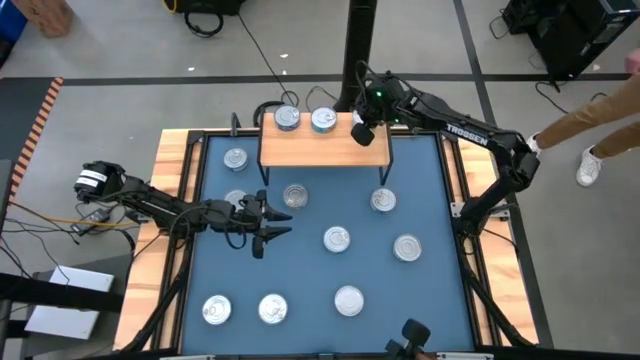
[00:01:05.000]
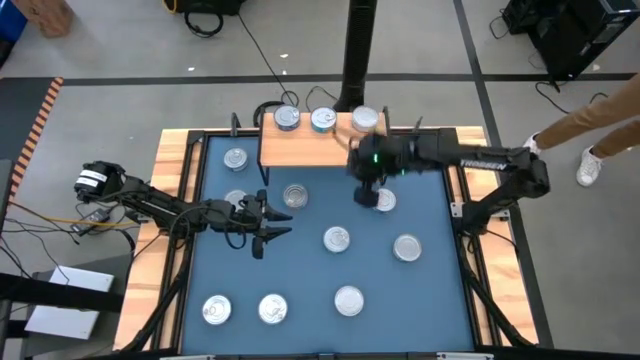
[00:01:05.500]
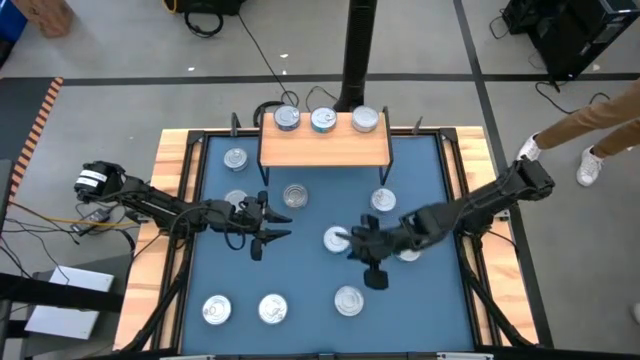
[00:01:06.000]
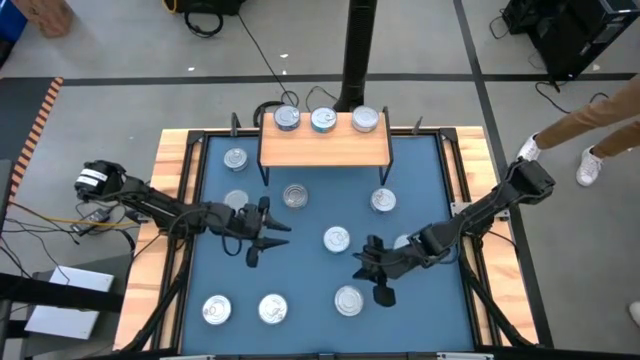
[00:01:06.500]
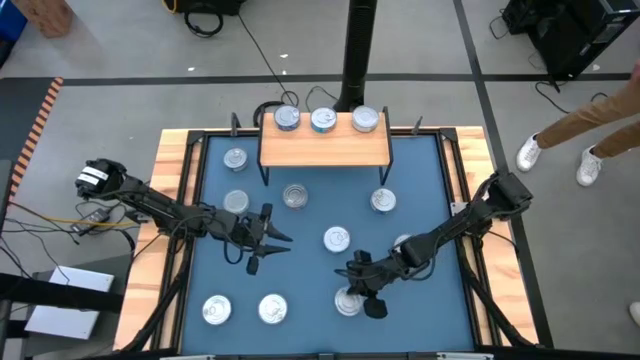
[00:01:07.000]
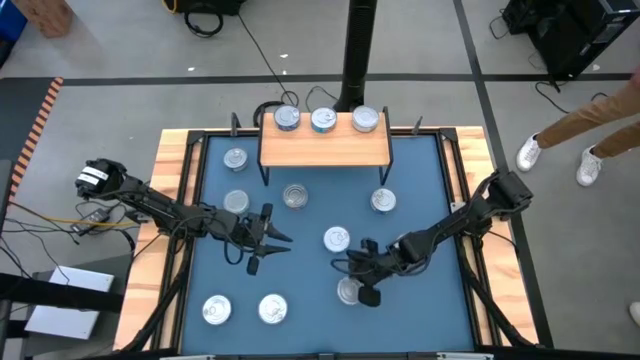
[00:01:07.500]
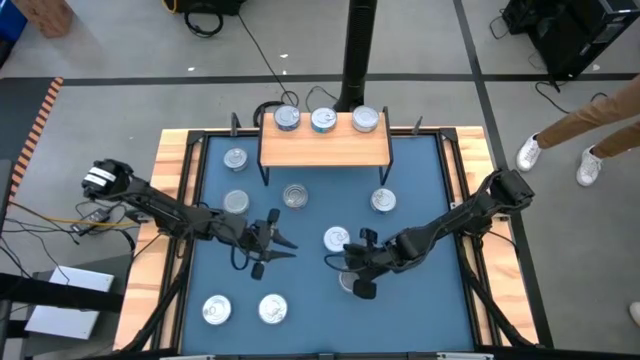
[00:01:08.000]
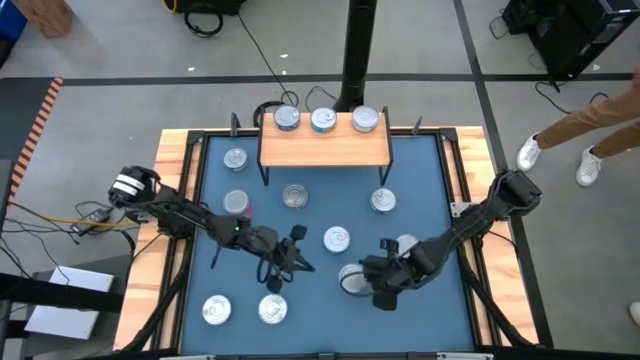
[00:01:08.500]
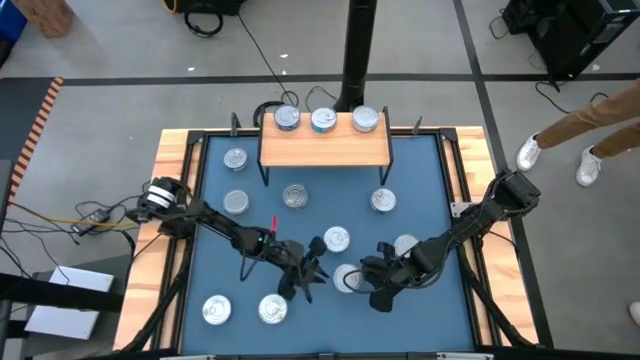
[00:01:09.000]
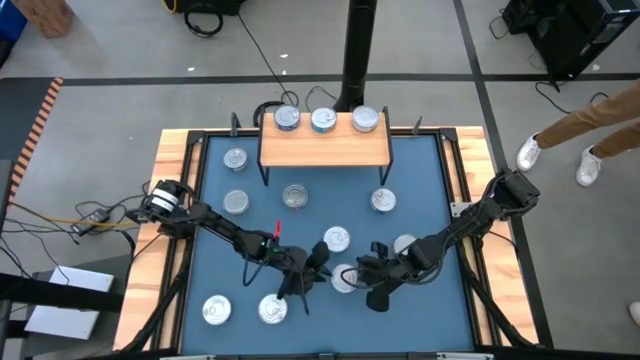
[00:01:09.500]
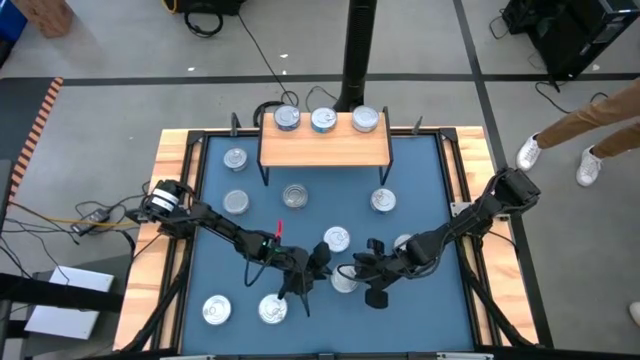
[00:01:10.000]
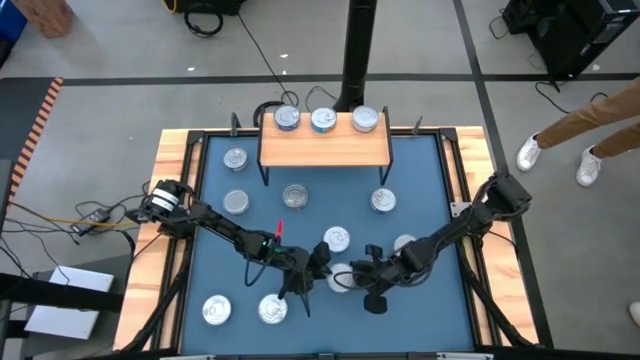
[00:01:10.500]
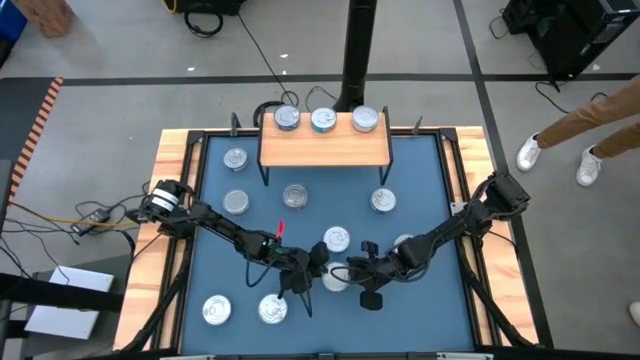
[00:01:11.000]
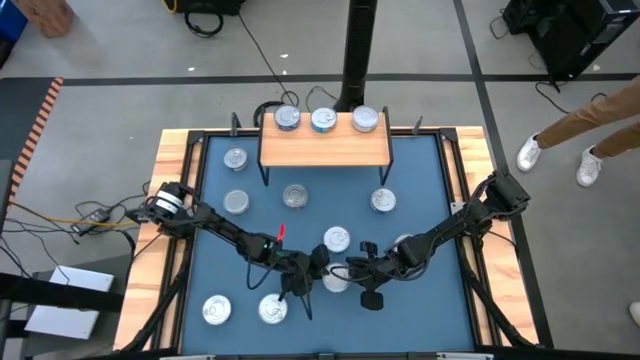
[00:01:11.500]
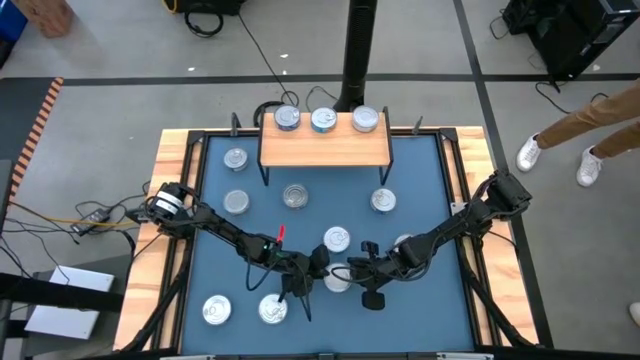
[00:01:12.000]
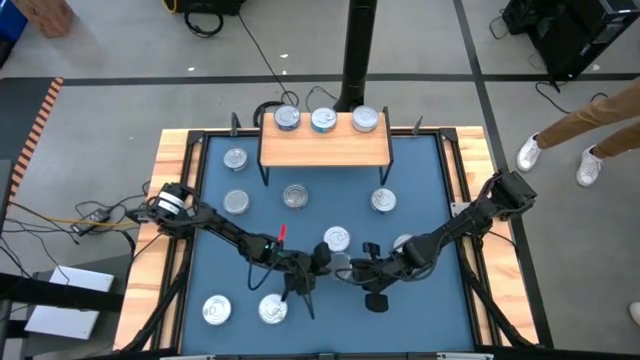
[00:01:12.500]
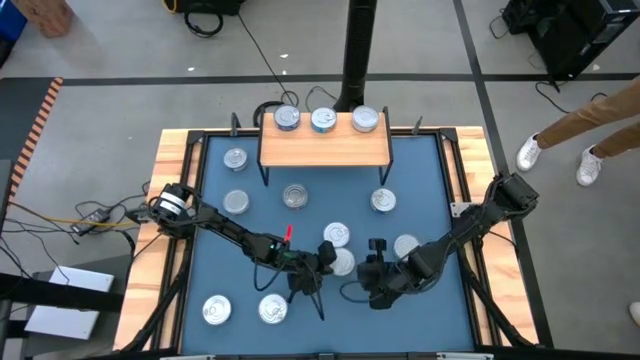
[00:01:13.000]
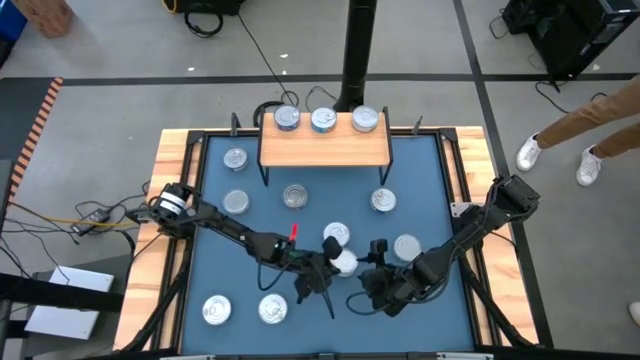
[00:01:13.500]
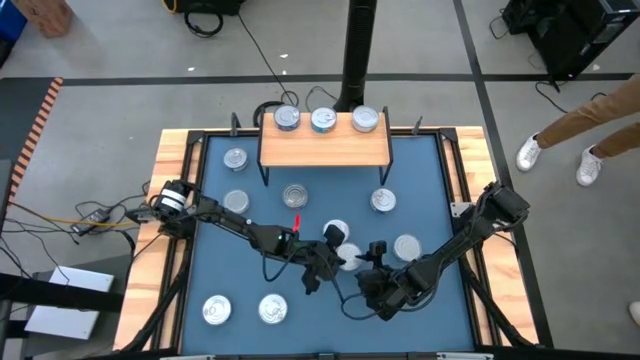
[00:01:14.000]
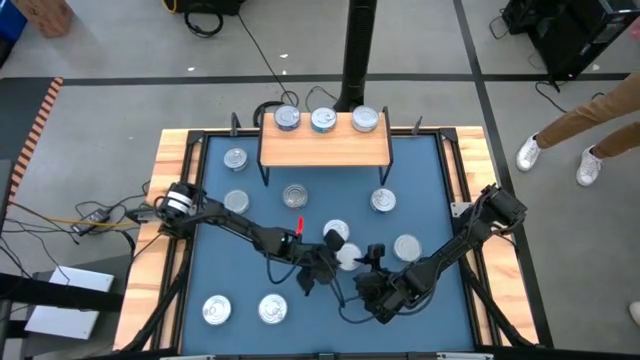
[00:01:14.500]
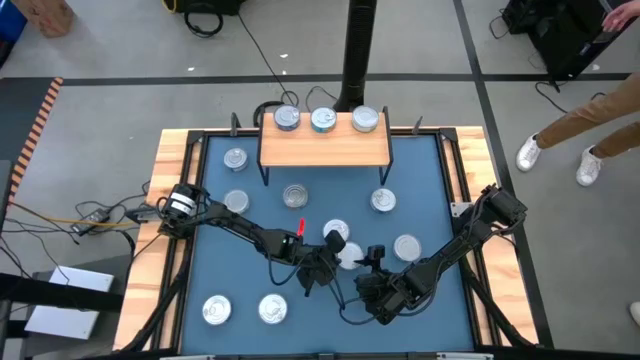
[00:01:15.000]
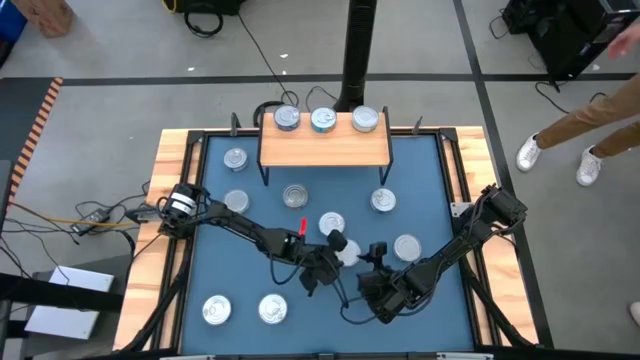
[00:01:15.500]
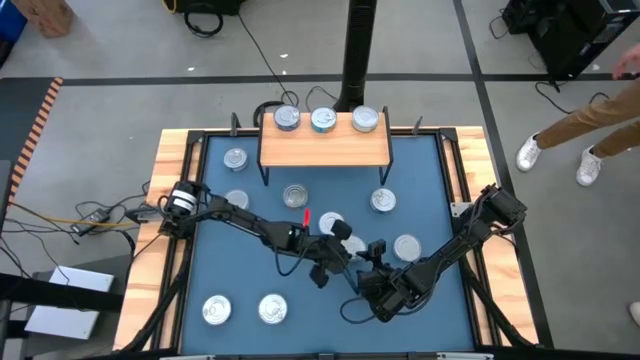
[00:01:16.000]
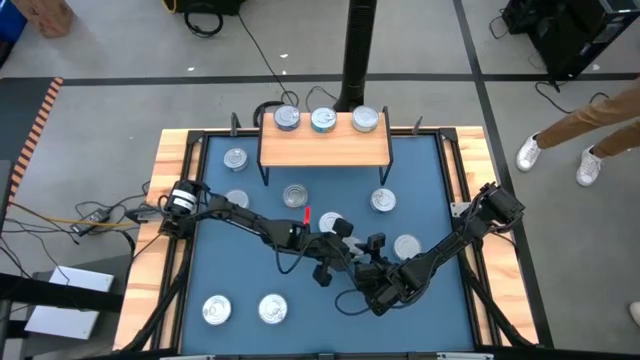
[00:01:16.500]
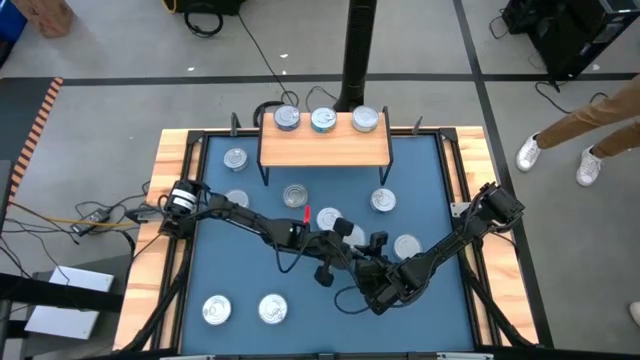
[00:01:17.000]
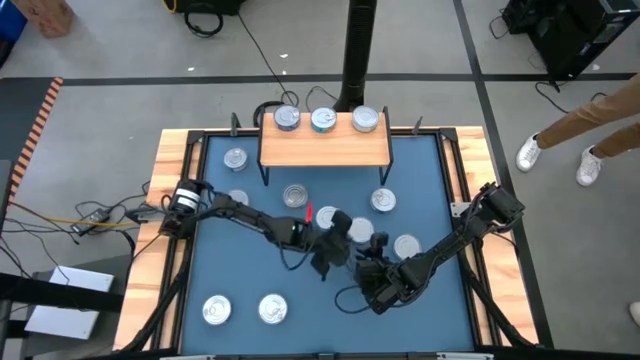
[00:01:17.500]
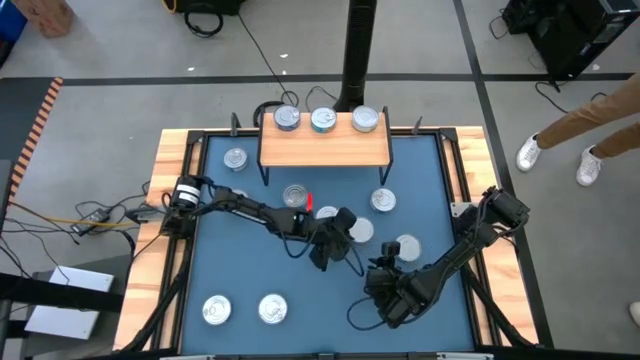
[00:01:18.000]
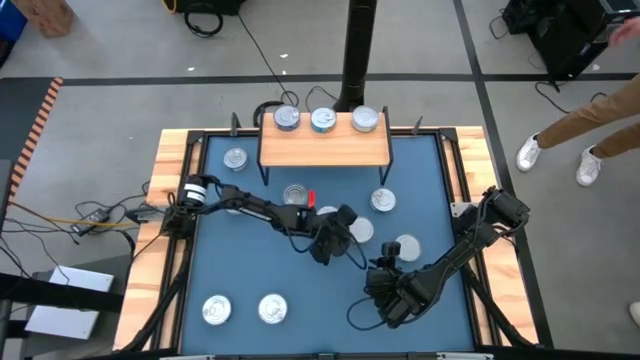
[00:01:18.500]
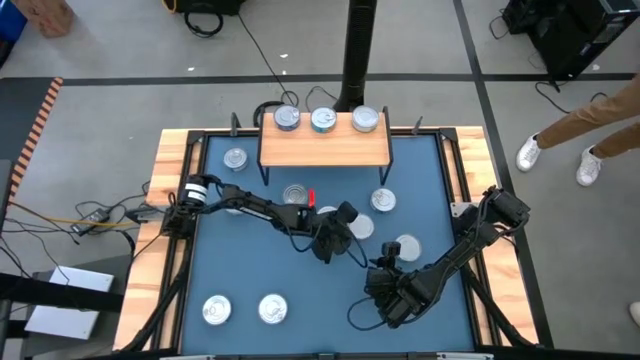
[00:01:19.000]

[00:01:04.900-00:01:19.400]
Task: Stack canned seafood by type on shelf
Stack the green tuna can on top of the green tuna can on the shelf

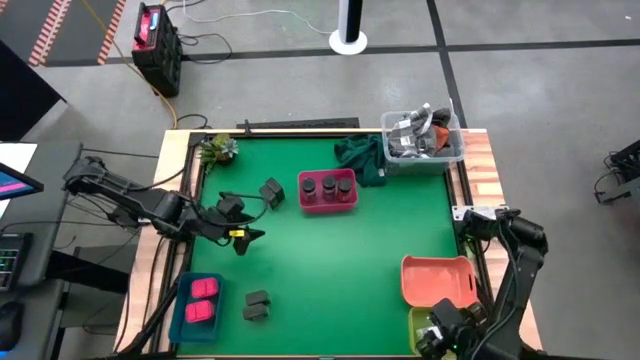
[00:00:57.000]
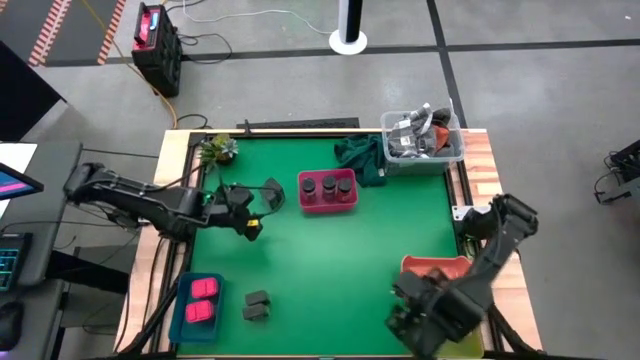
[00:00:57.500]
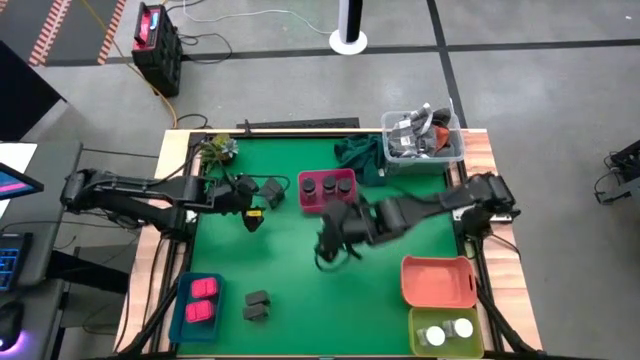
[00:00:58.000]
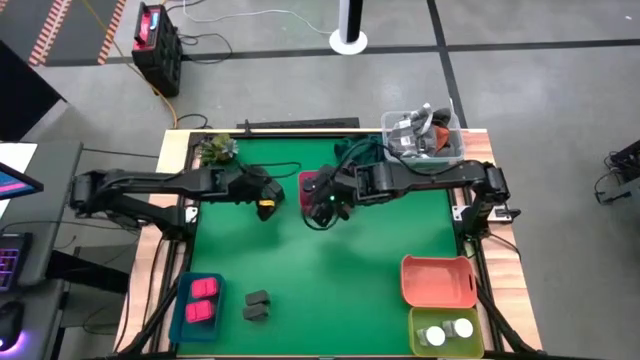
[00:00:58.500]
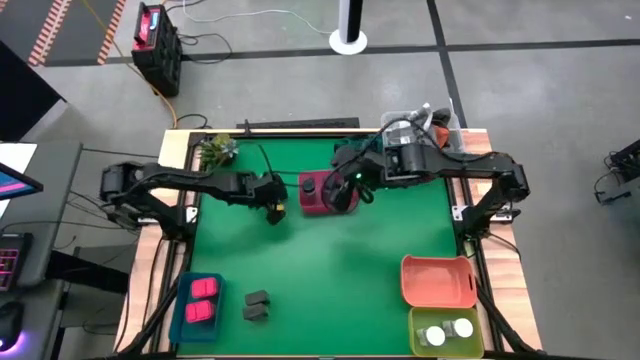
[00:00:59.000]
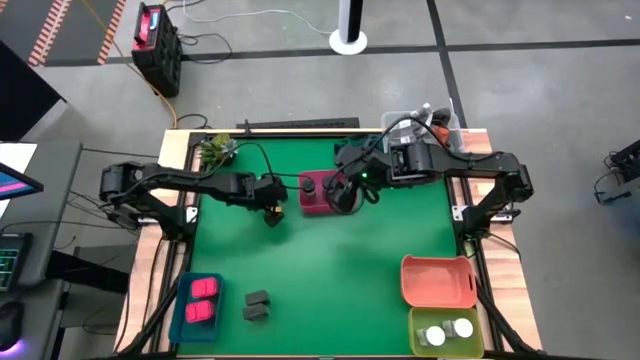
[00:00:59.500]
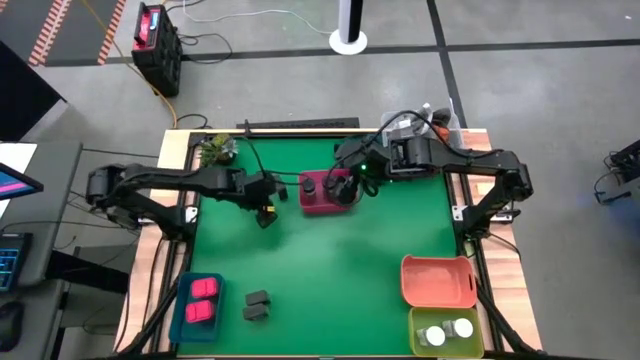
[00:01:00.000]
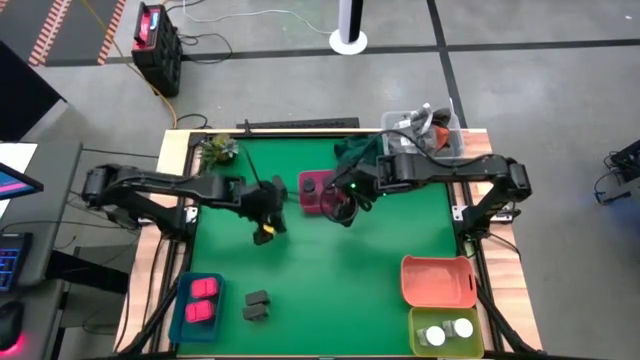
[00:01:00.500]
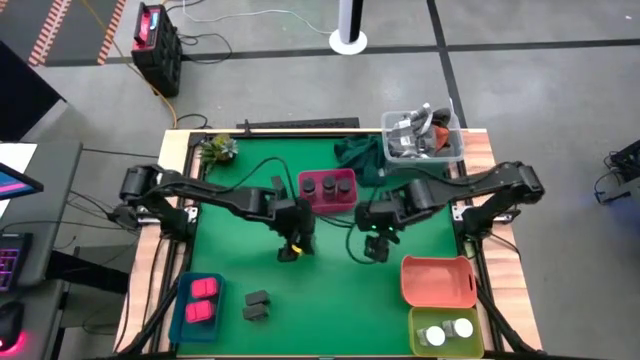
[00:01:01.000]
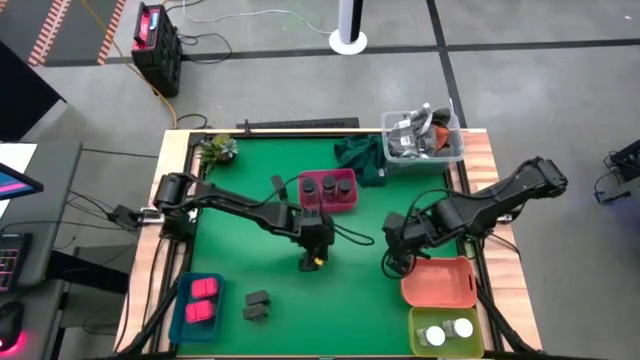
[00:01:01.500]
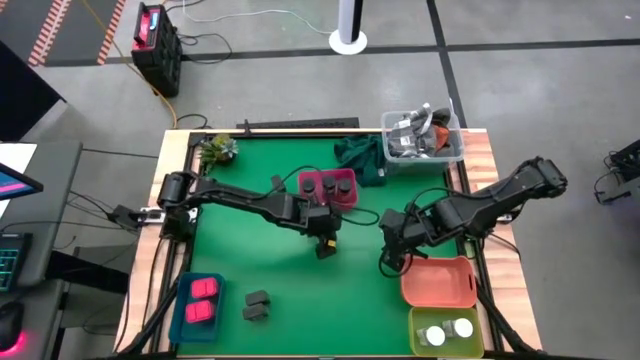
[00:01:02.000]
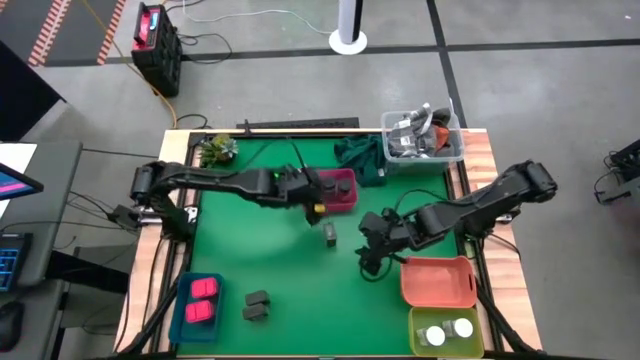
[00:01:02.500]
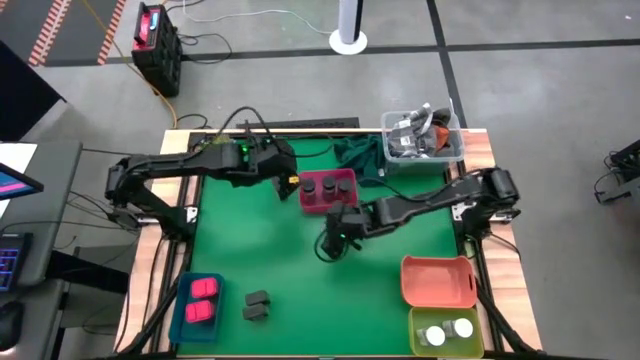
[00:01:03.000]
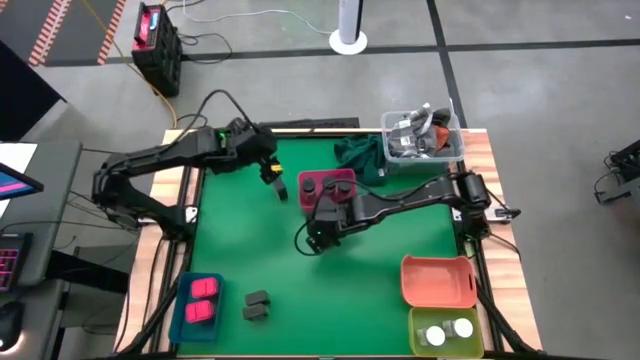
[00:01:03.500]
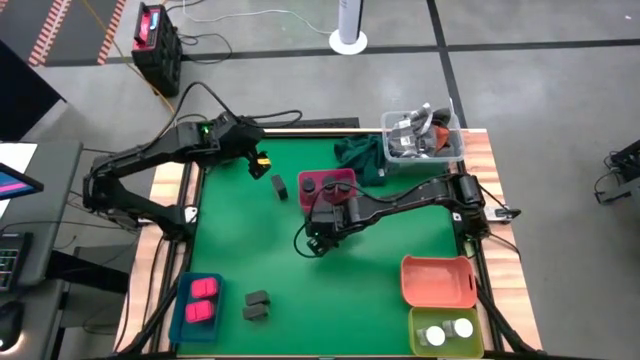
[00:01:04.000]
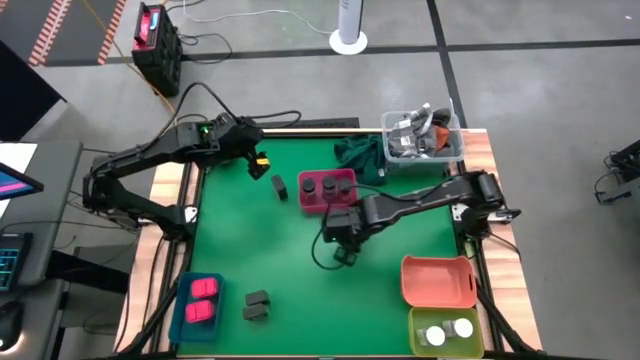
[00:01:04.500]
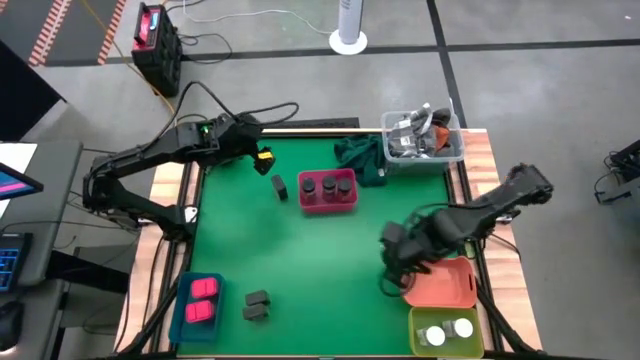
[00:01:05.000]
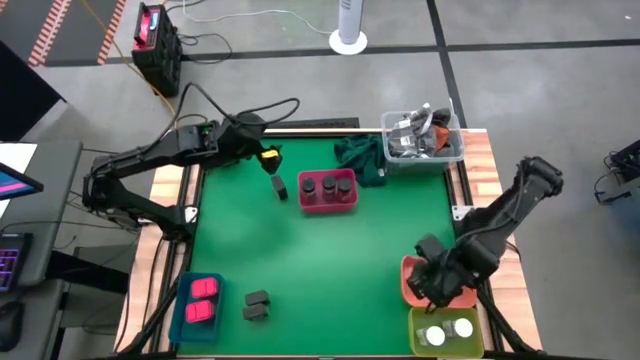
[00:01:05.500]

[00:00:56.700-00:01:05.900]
Task: Sort spices by type
Put the top left black seasoning can into the orange bin
